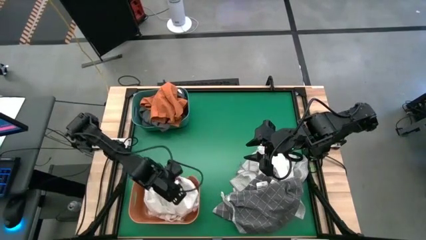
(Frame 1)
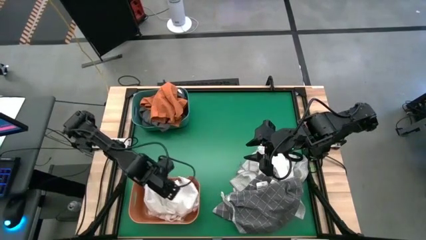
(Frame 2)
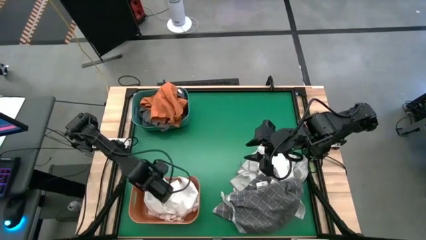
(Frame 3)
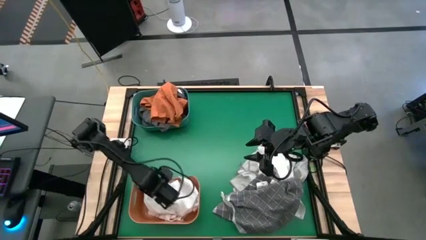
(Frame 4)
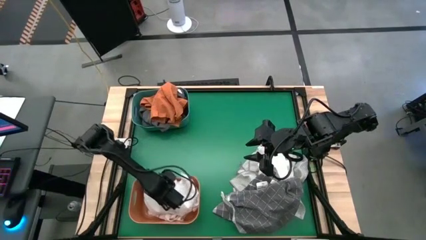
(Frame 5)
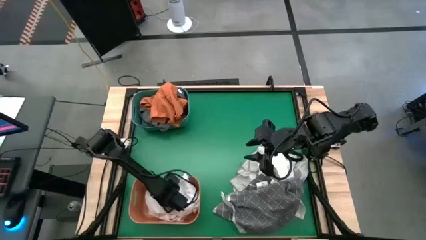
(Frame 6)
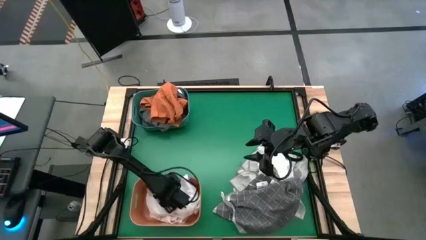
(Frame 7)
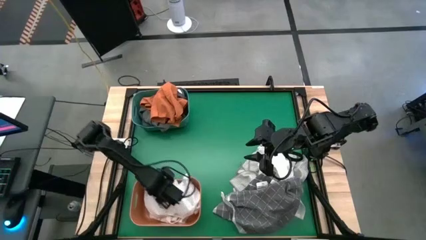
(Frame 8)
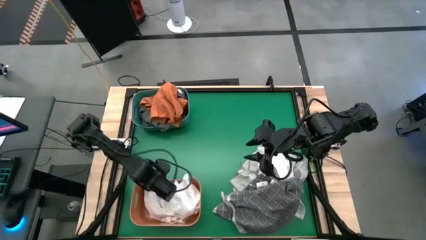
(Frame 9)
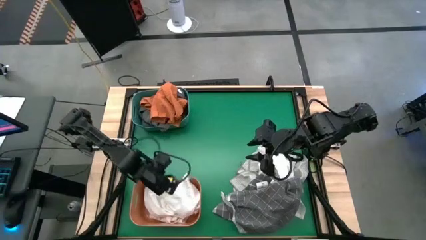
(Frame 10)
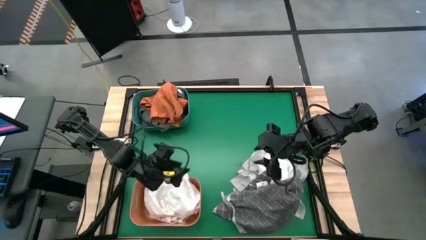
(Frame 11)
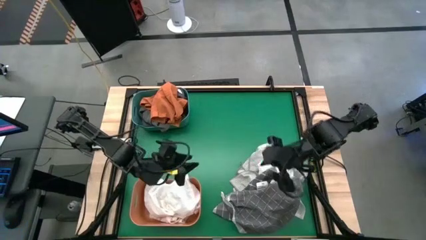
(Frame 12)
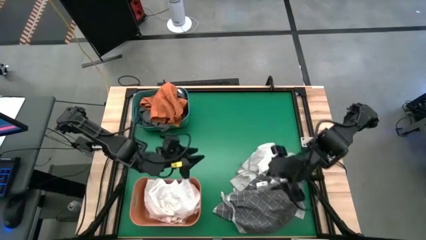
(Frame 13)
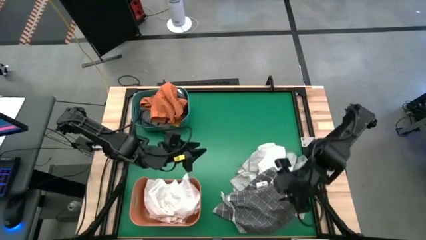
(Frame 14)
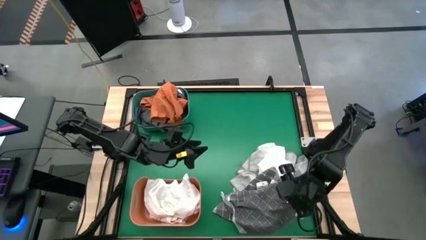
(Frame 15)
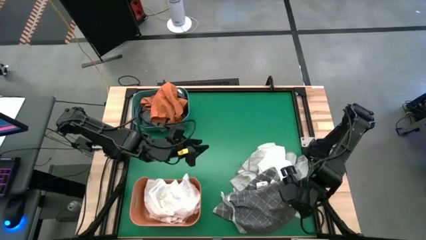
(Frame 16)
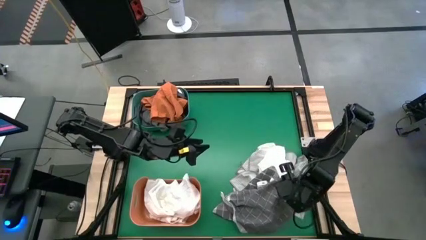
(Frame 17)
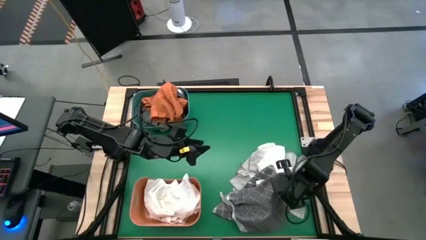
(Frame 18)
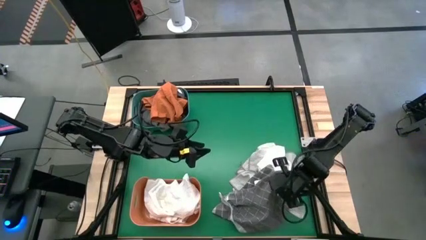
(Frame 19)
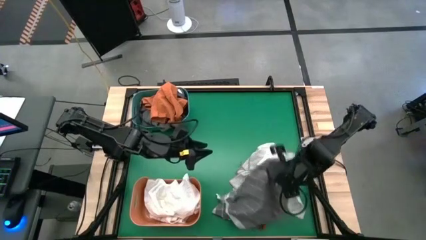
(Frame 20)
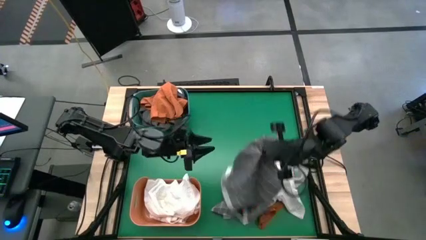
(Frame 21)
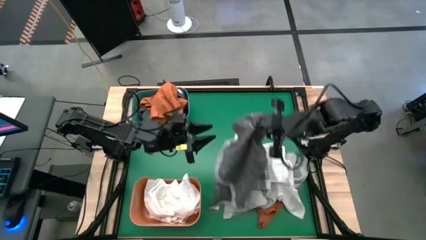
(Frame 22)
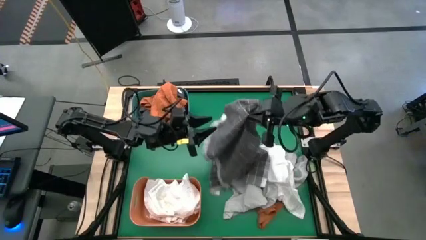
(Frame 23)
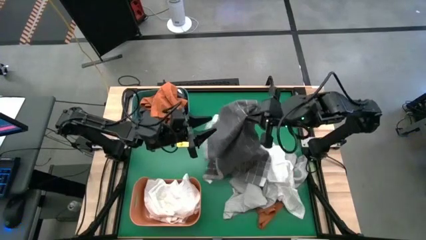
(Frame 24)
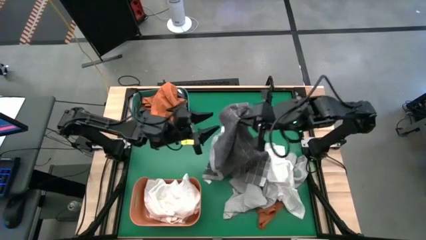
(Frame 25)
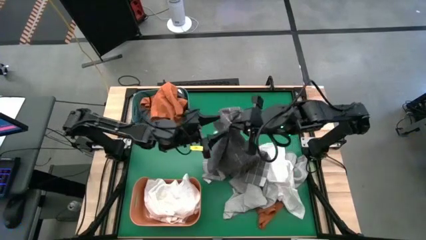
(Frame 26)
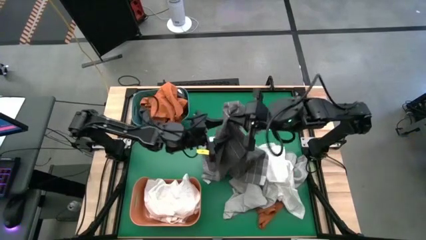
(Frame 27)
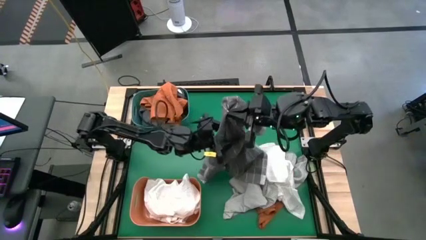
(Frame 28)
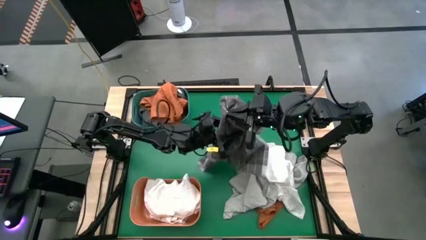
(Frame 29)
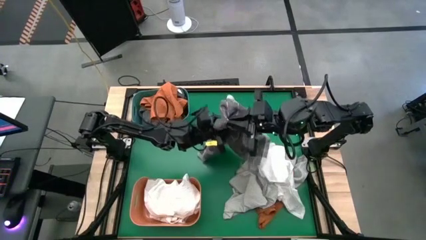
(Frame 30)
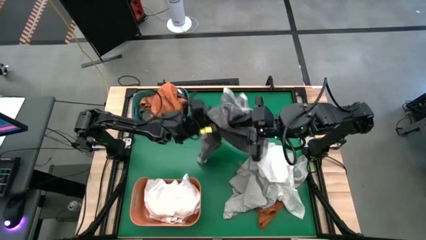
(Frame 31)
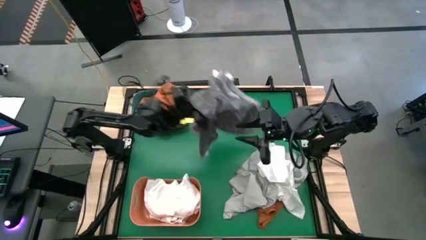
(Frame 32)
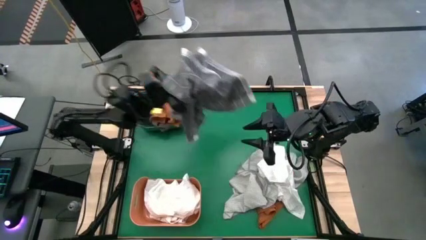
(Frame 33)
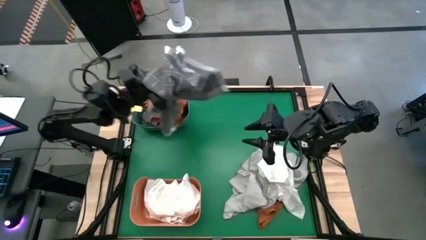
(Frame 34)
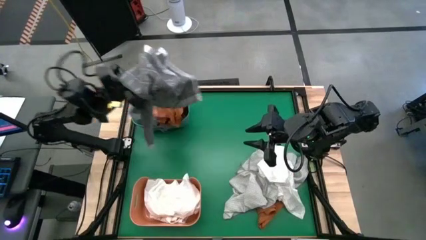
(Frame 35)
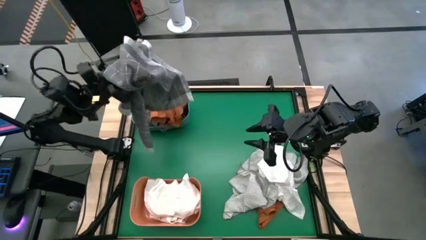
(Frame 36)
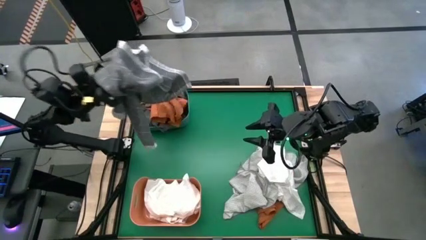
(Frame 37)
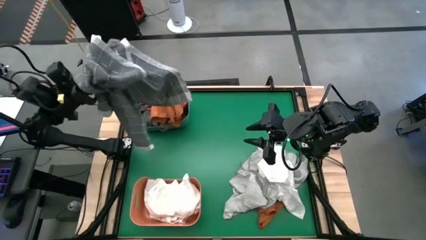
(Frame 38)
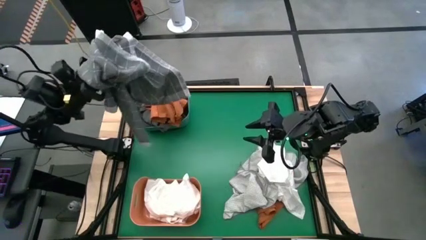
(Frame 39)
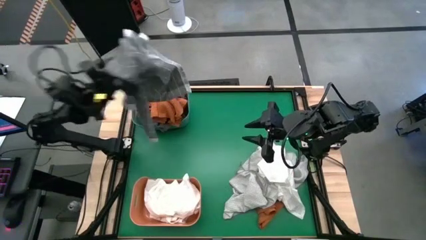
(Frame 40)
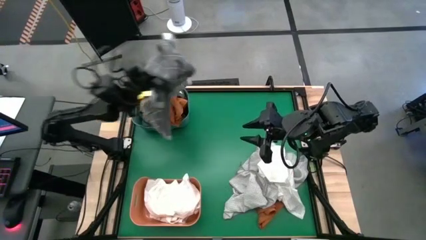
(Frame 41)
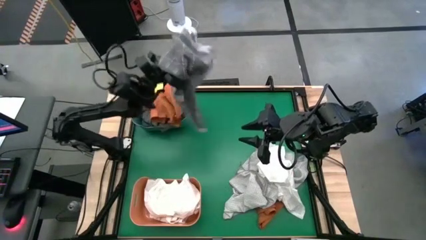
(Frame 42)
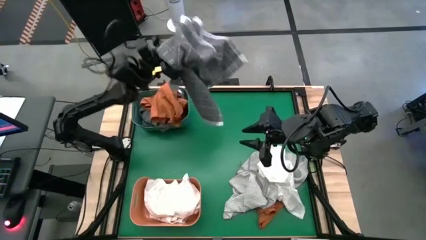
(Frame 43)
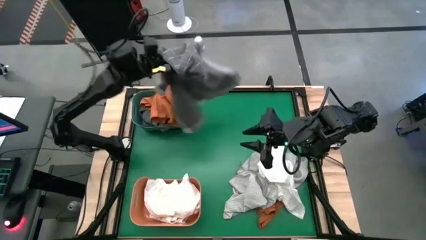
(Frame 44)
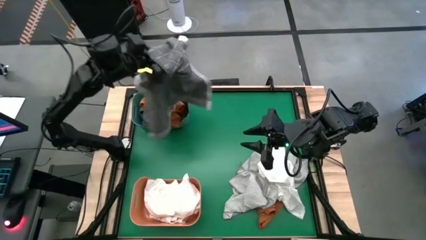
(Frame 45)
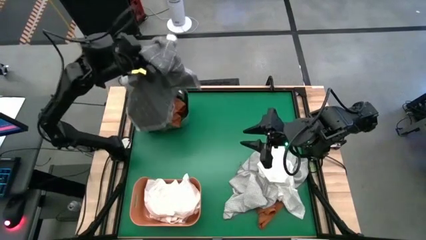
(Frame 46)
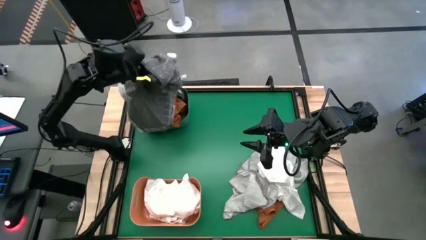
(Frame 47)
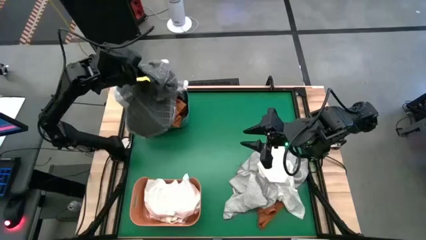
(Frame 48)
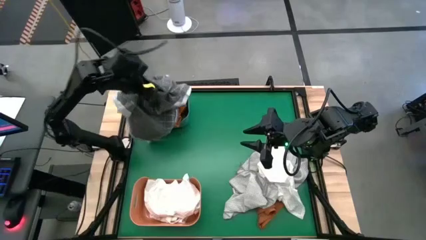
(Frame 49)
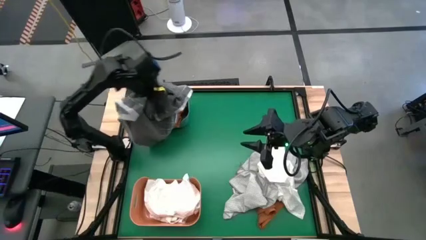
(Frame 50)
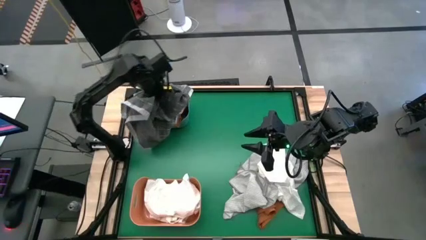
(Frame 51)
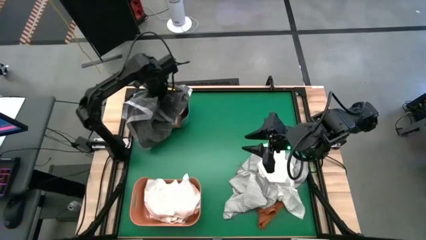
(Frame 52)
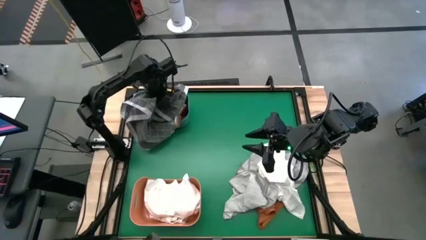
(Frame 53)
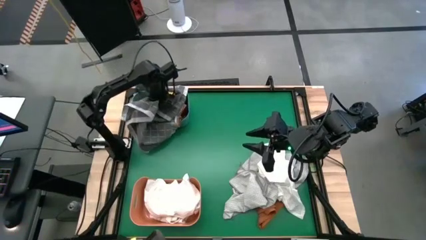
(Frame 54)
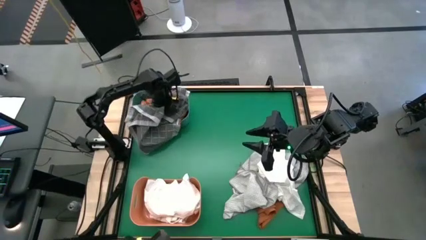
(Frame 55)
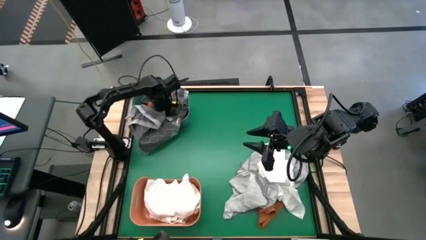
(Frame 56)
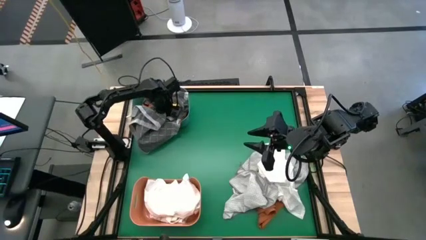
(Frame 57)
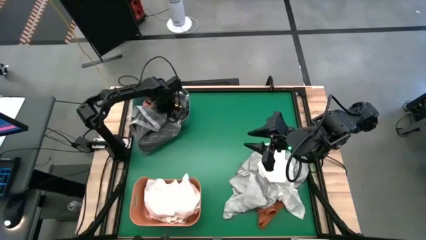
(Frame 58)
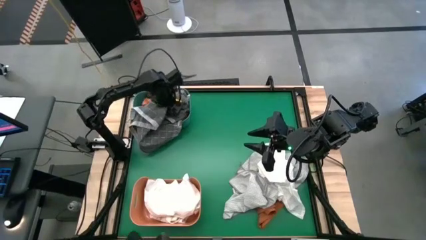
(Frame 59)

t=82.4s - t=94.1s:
Task: Sort microfiber towel by color & place in baskets
Put the black and white microfiber towel into the green bin
